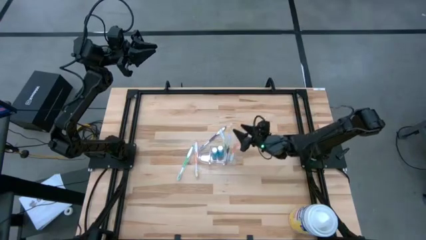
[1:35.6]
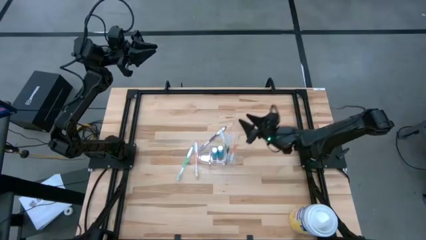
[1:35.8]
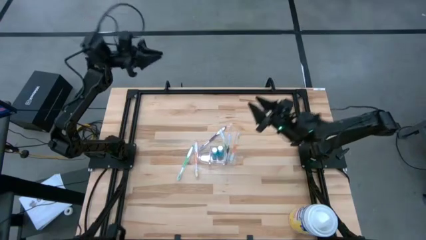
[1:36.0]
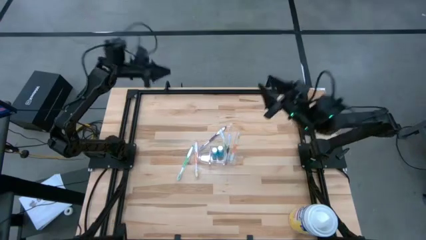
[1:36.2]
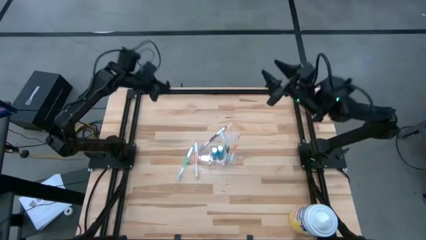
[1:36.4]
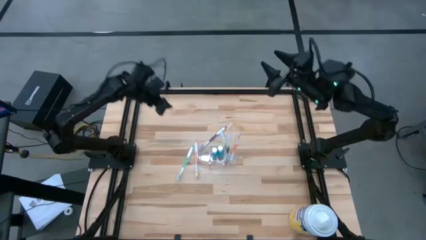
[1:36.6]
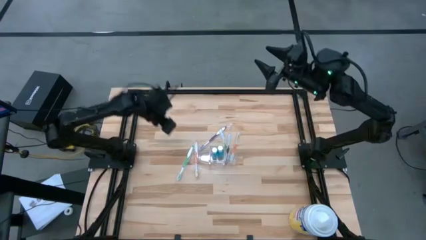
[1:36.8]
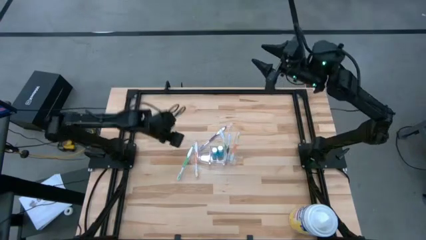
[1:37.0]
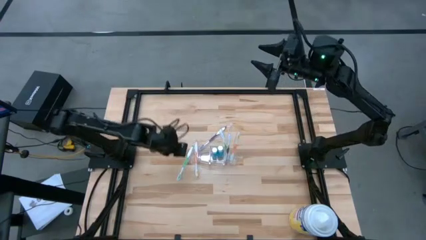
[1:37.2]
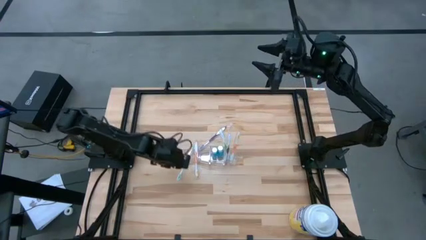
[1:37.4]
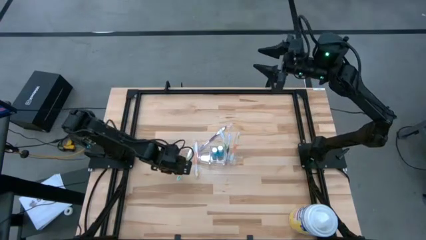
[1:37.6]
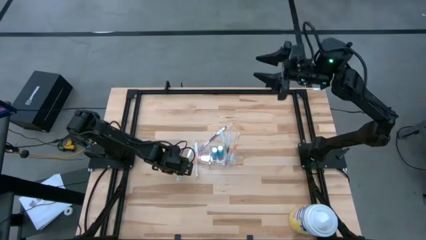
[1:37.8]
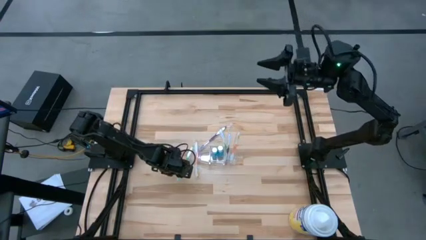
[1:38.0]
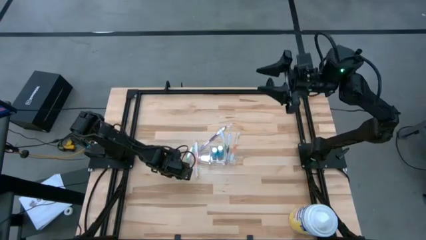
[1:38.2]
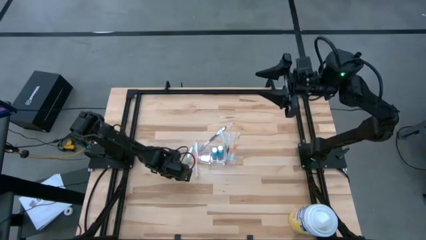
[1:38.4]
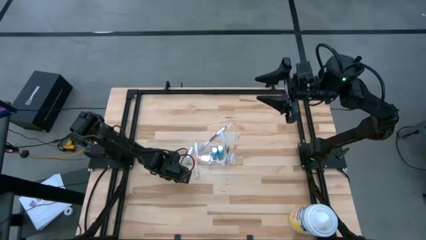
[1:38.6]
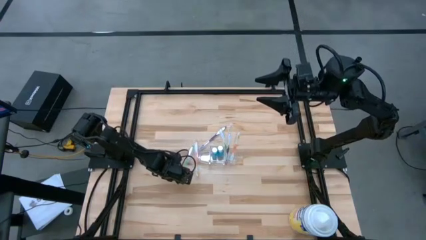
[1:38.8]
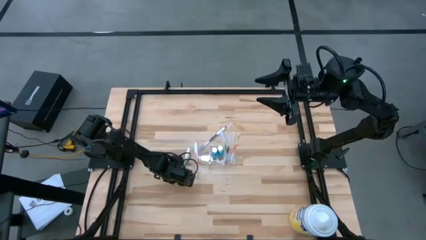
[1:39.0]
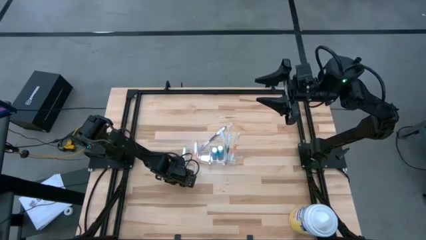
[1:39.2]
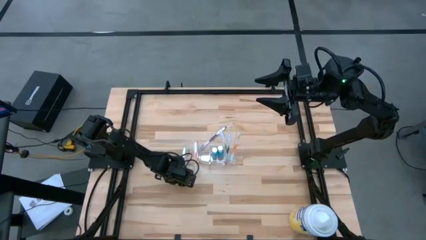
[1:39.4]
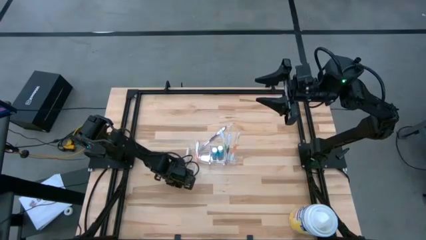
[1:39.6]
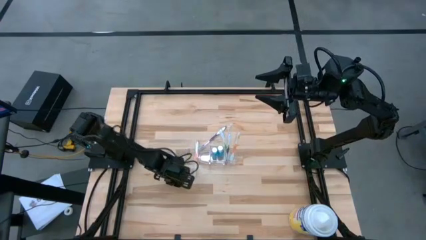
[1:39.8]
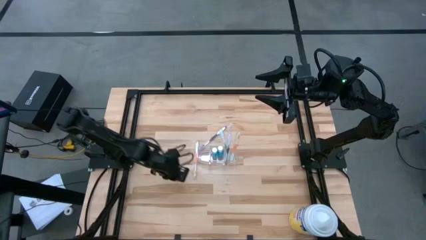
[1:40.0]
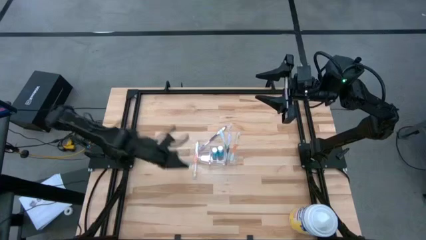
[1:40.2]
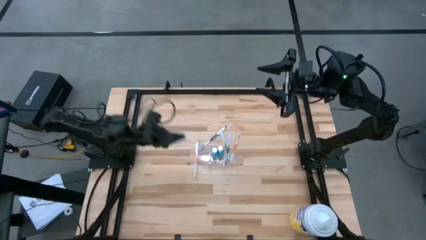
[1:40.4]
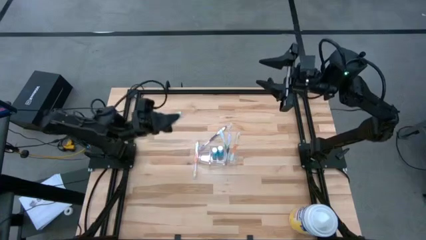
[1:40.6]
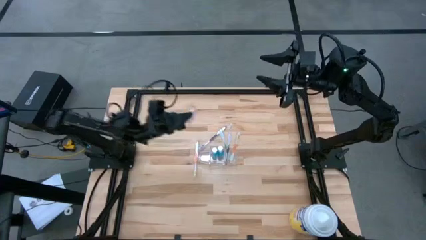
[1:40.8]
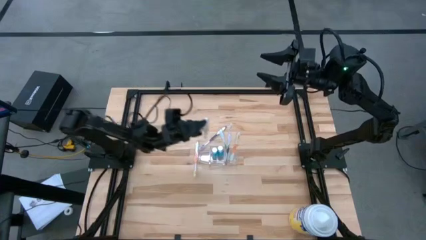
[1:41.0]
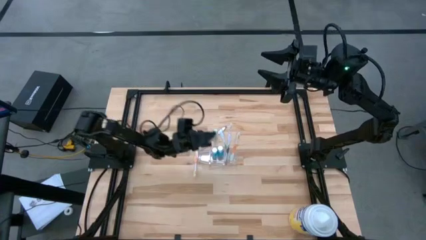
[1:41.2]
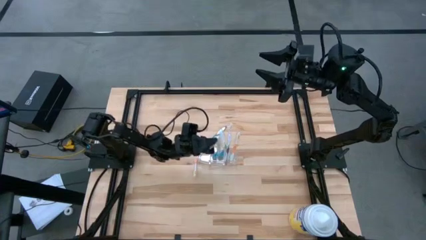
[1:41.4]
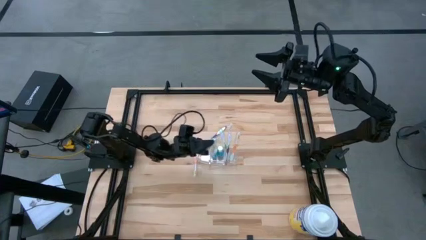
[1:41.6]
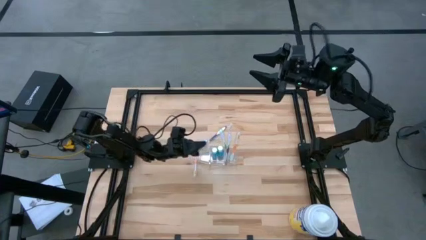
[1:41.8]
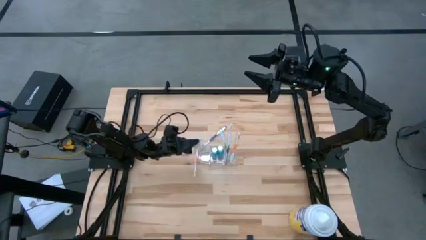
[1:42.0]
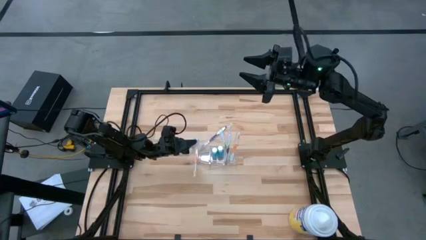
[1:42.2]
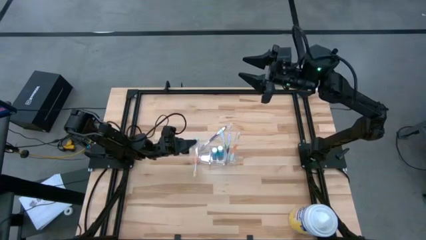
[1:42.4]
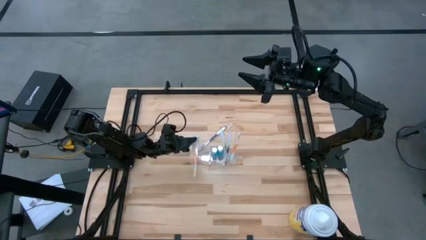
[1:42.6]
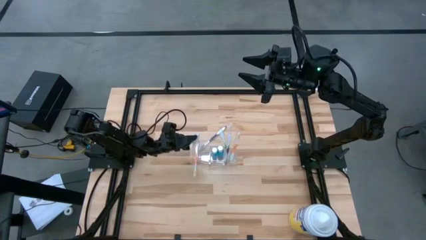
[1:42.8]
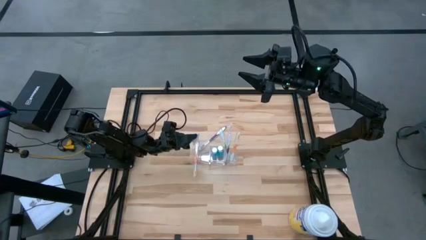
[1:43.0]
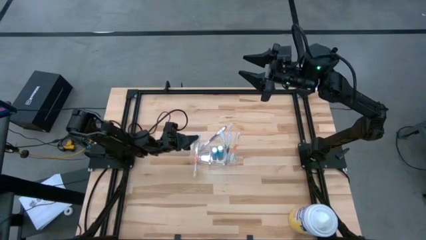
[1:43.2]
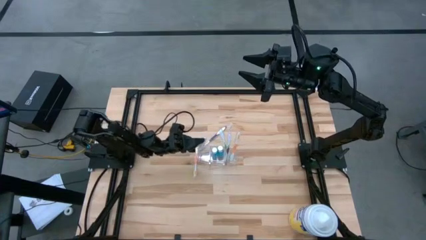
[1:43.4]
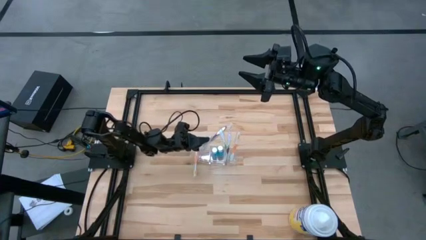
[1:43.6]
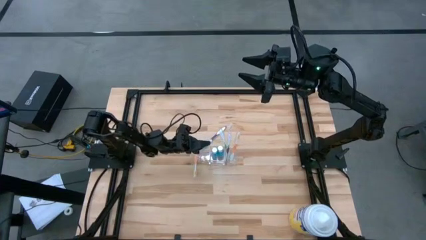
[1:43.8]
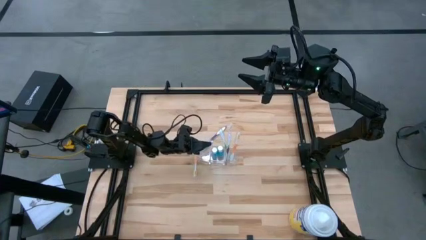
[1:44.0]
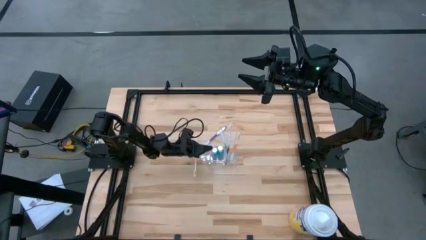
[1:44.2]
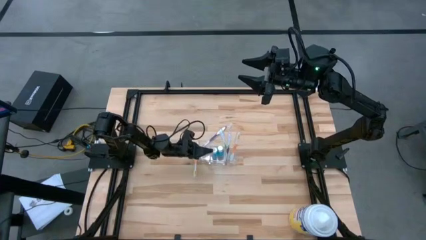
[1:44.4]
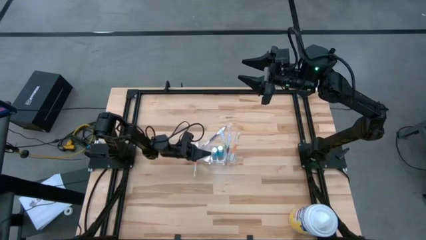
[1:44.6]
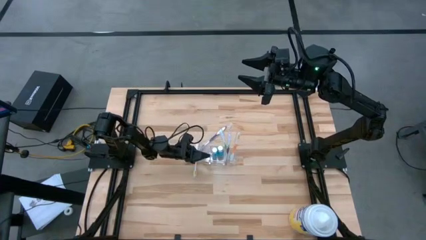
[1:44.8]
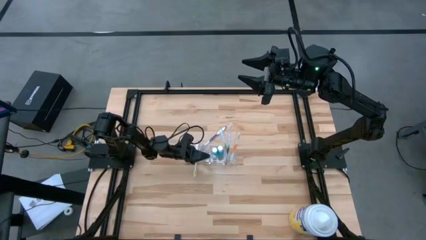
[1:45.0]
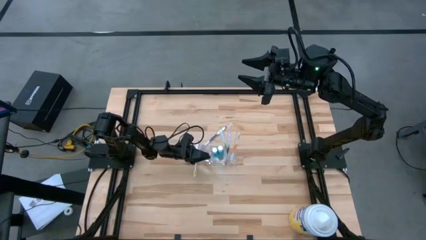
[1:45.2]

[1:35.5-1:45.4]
Task: Pick & Place toothbrushing station
Put the green toothbrush into the transparent organizer

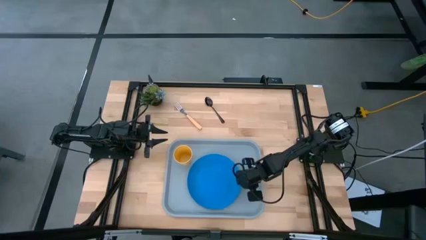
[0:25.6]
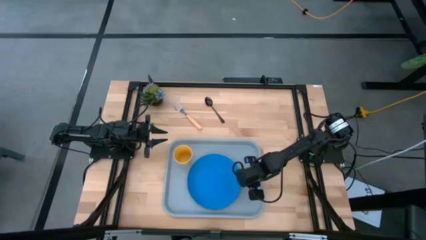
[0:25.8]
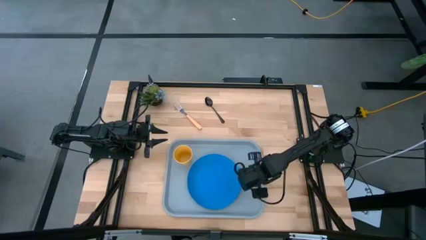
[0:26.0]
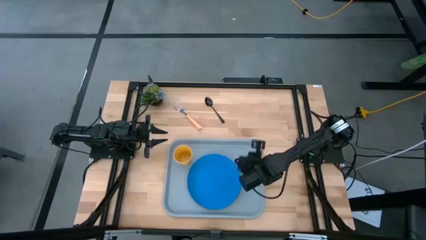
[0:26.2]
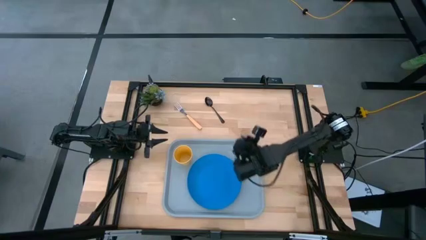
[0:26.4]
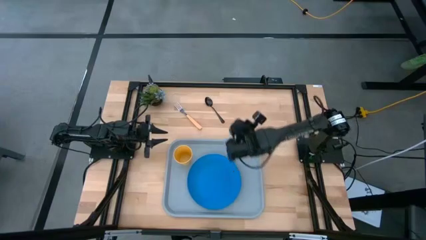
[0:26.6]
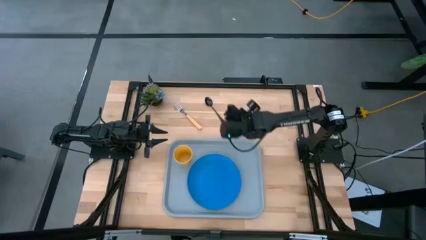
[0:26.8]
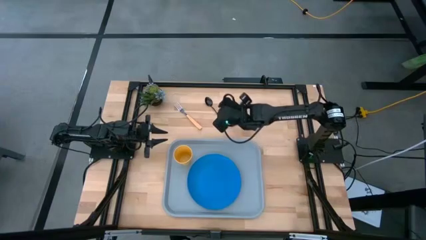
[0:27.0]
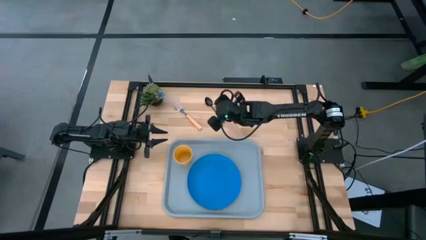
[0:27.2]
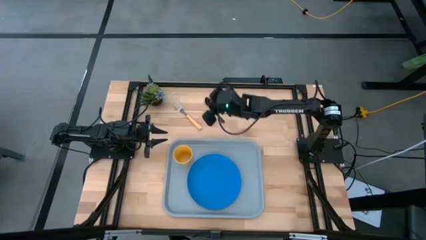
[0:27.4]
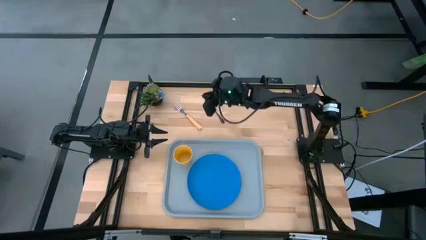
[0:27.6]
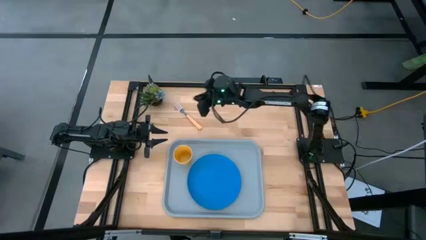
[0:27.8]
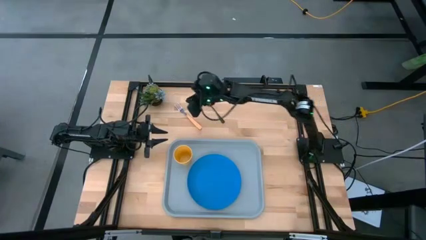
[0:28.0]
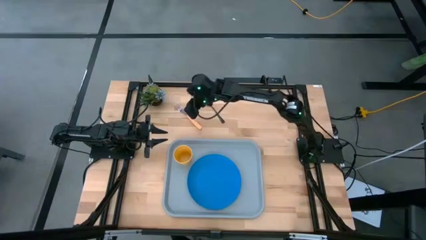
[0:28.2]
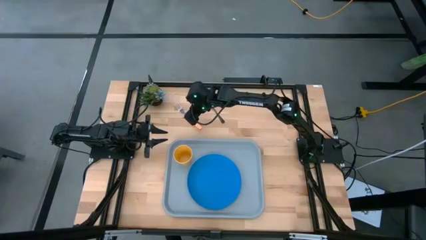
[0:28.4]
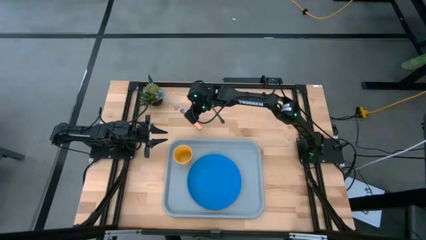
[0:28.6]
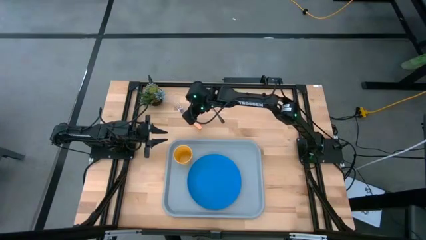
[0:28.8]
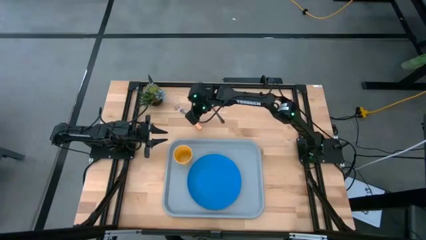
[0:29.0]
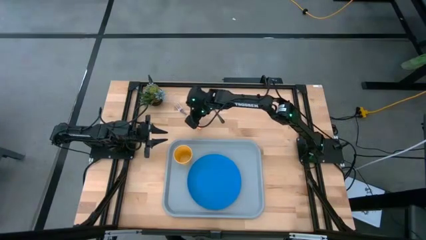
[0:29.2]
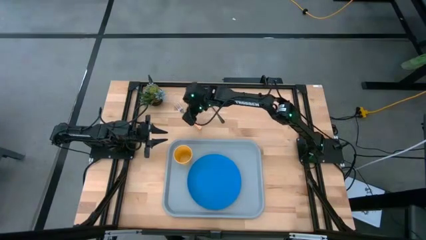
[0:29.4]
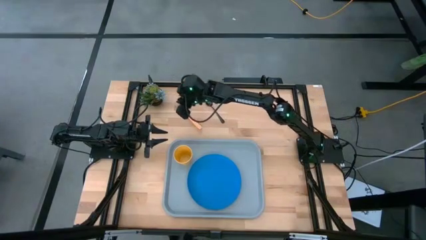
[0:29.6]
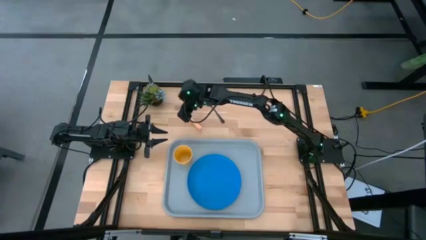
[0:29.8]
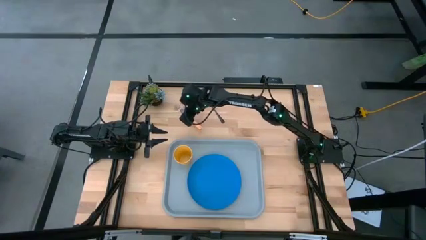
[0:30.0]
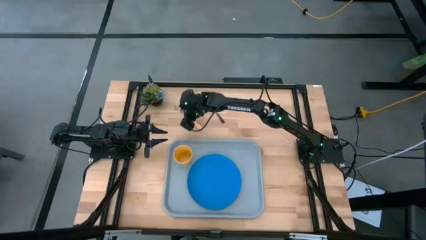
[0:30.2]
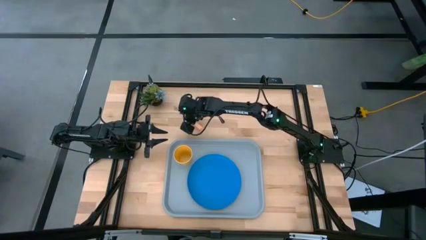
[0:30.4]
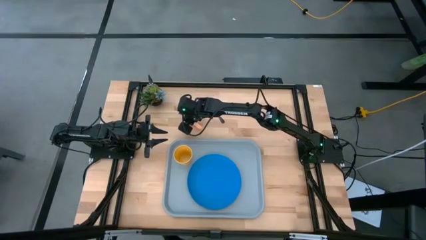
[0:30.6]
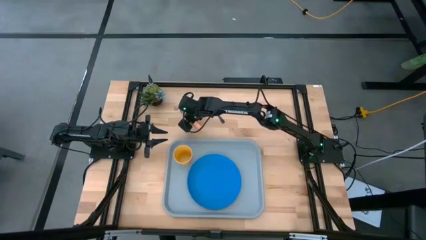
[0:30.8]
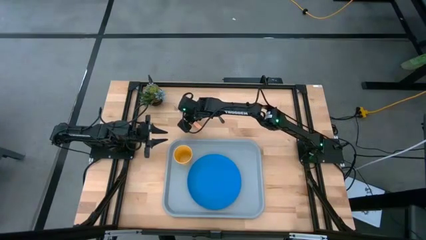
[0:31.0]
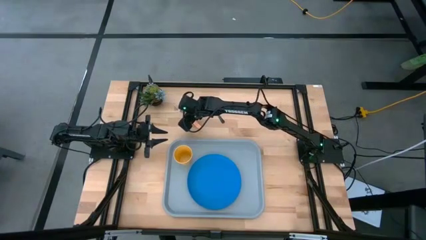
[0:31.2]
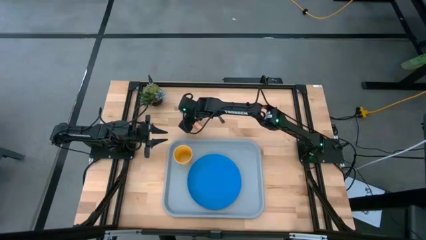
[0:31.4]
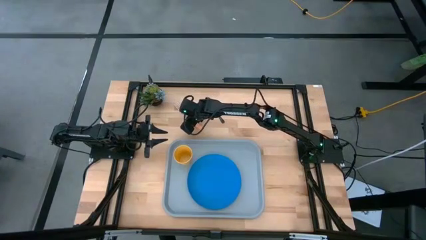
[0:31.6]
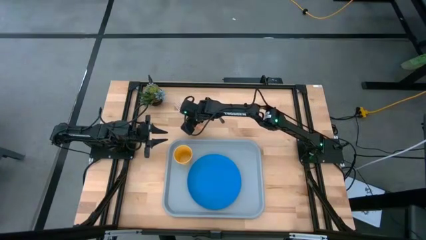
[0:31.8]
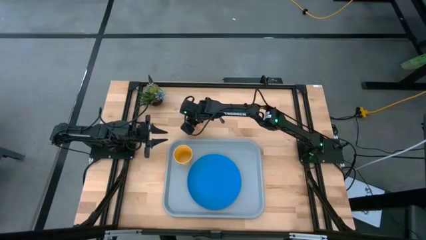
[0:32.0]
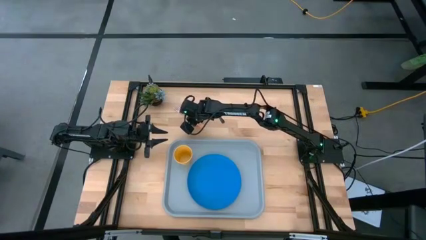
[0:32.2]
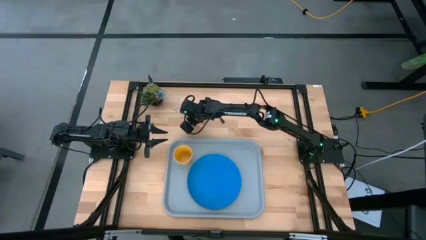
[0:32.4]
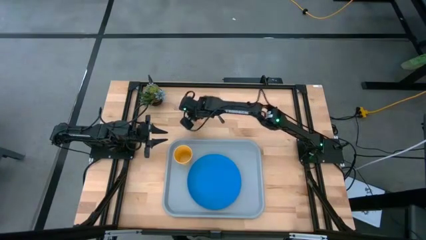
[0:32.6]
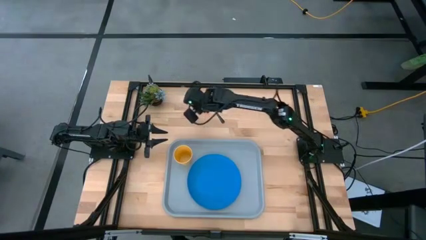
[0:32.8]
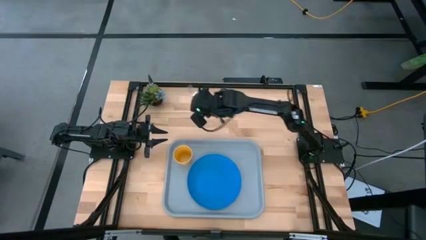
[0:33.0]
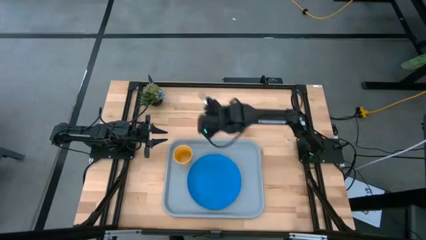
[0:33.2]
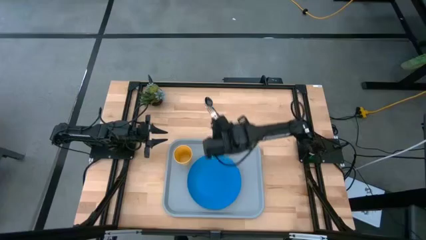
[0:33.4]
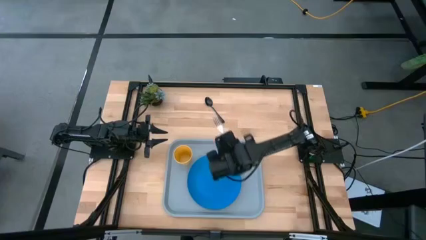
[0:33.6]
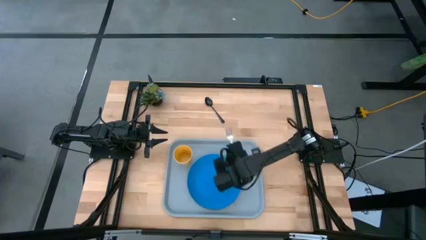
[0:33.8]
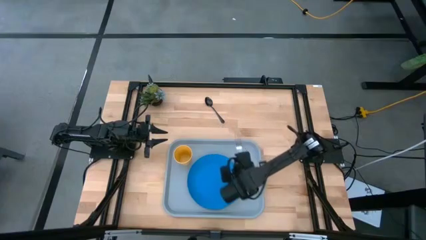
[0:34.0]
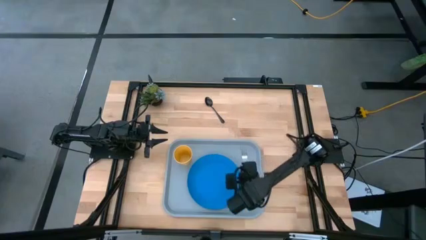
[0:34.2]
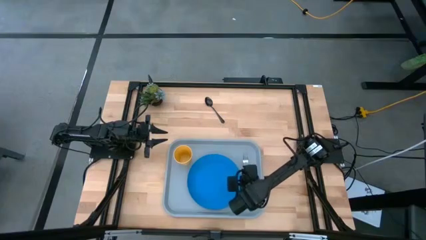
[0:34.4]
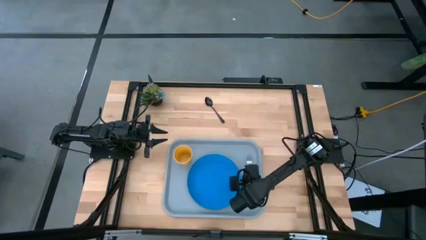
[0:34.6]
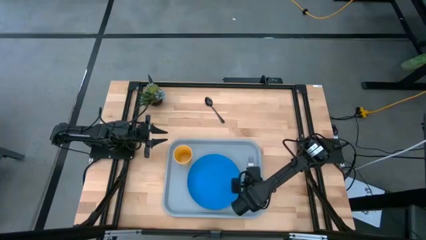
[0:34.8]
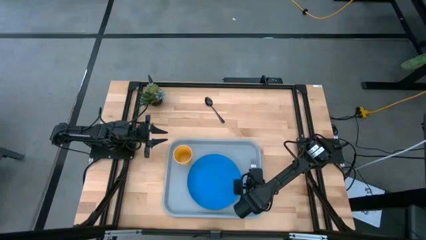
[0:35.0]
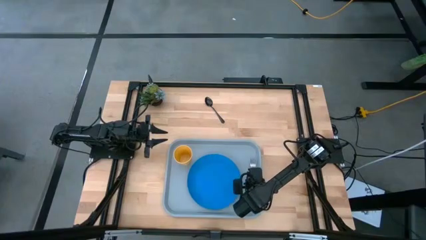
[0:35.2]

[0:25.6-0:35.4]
Task: Pick and place plate/cup/fork/spoon on tray
Put the light orange fork on the gray tray to the right of the blue plate
